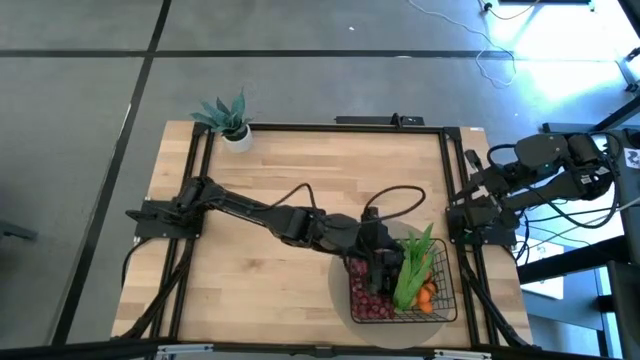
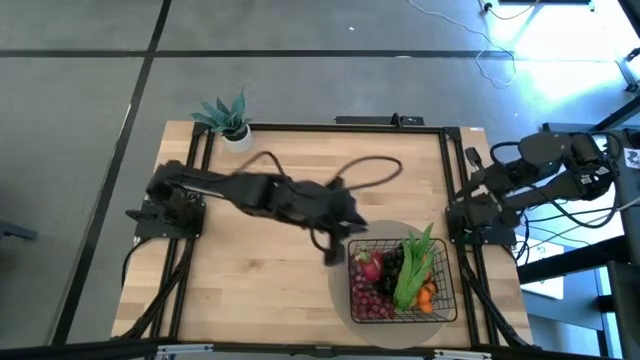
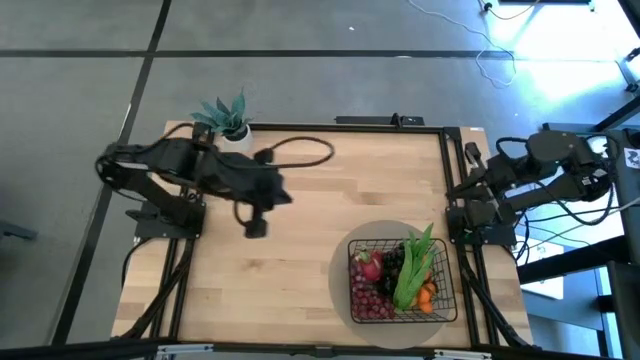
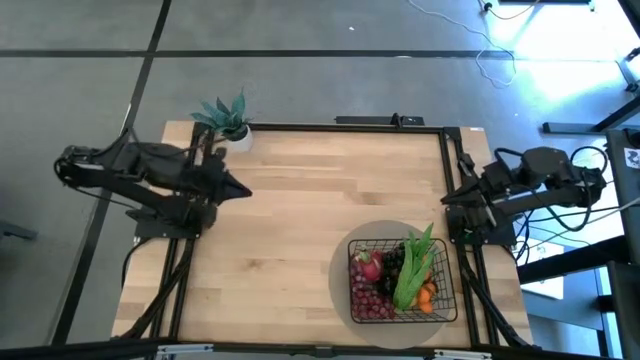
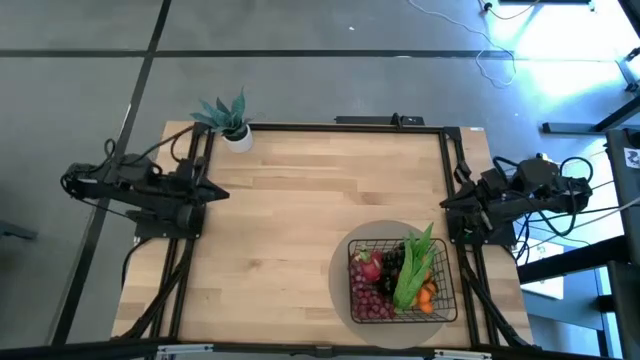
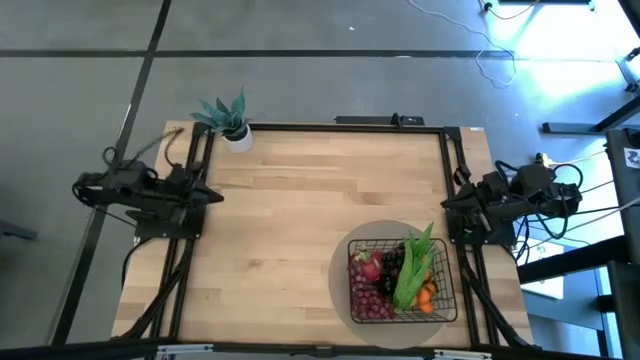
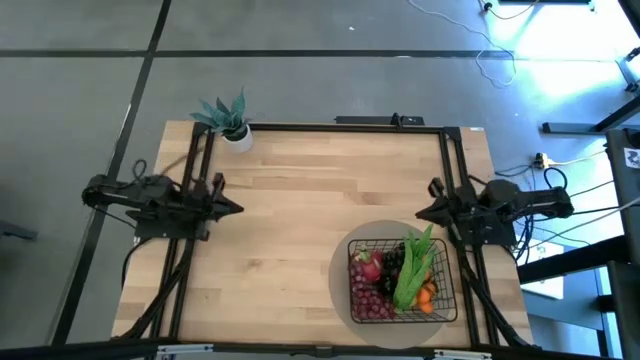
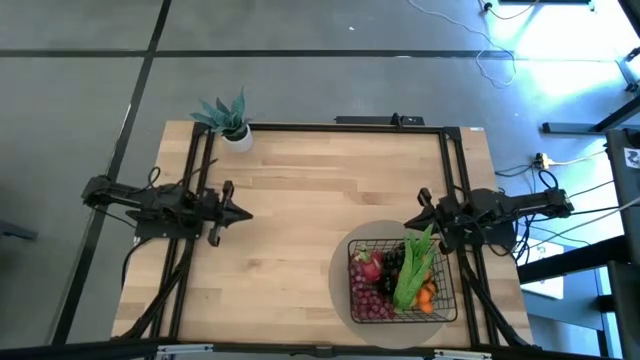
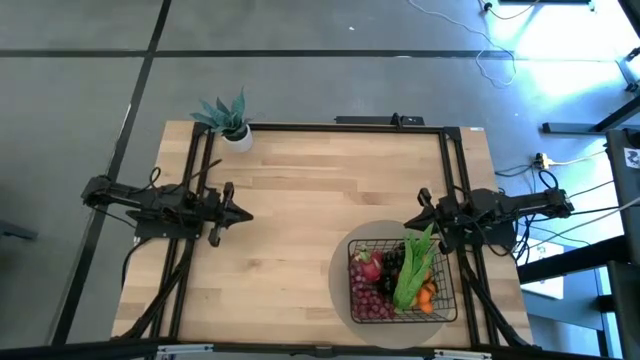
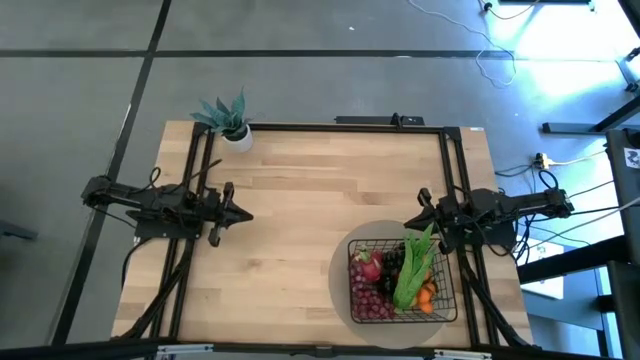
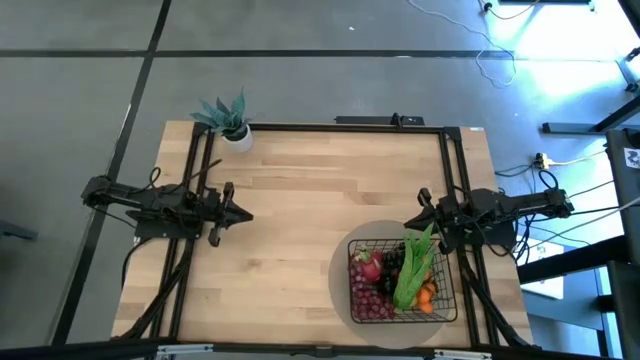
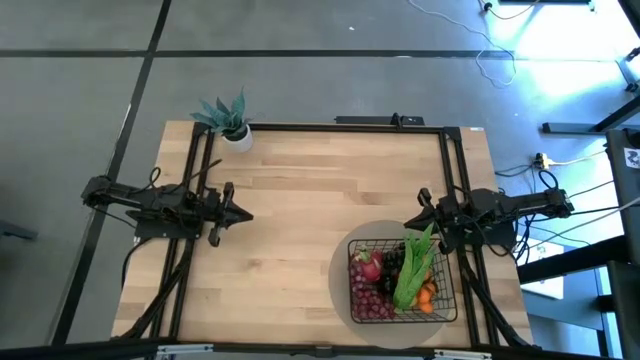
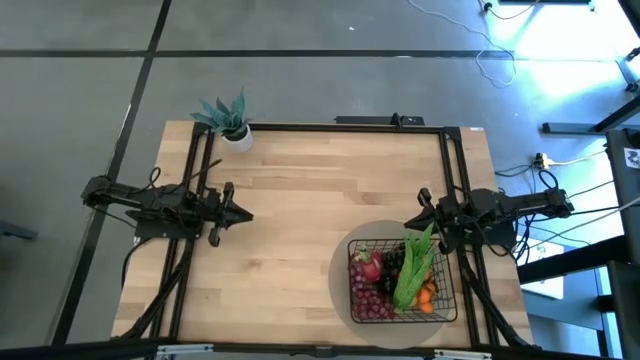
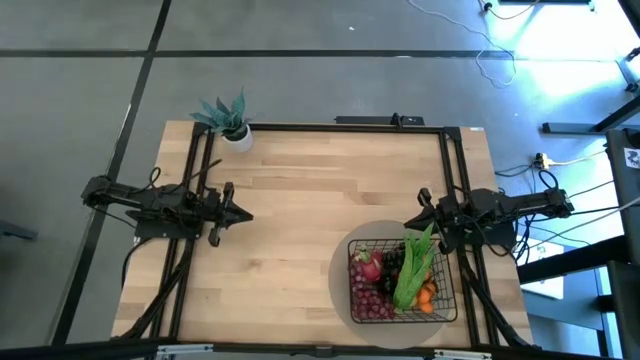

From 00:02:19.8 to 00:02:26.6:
Task: Build produce basket
Return to Home Position

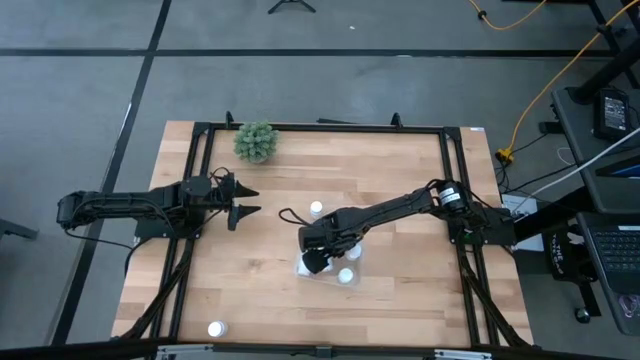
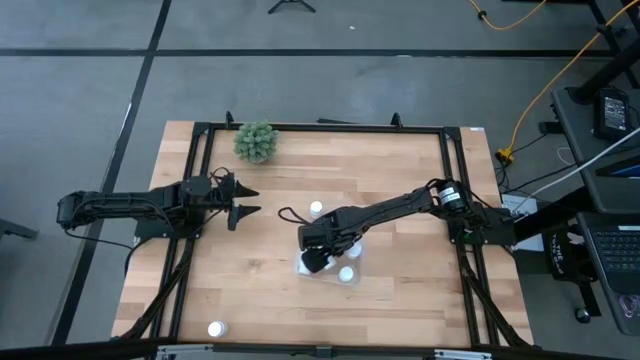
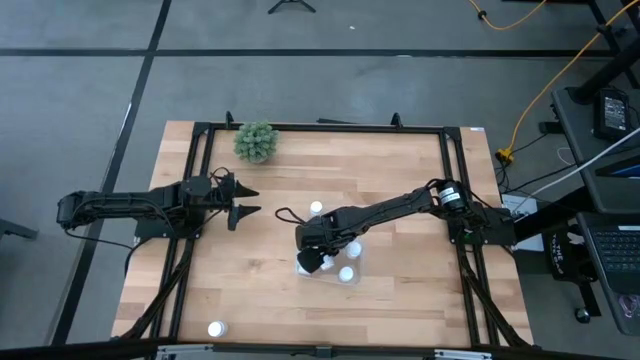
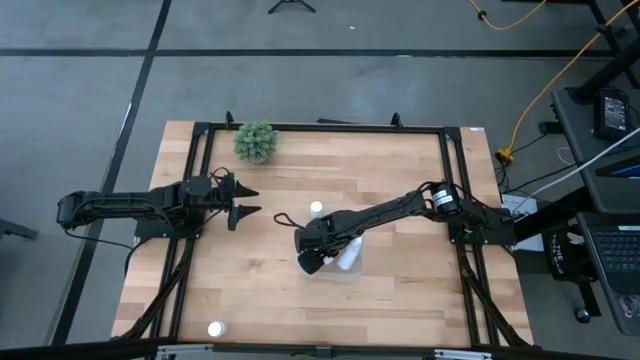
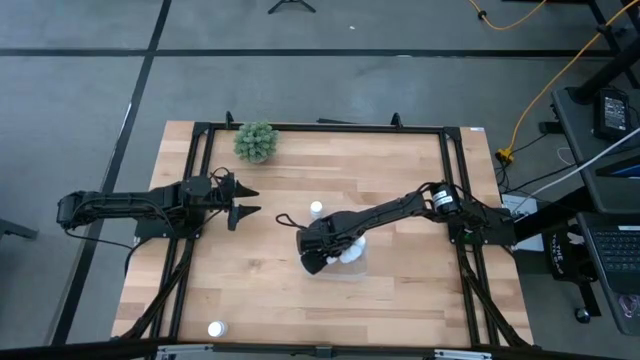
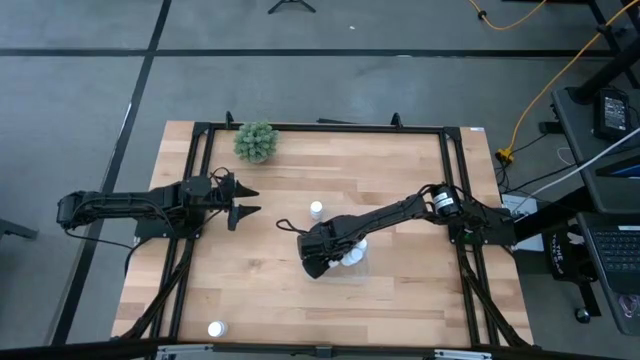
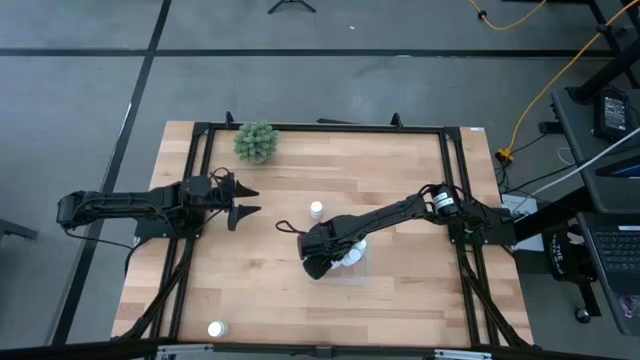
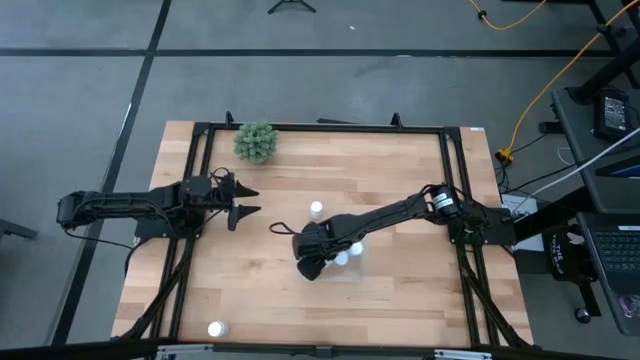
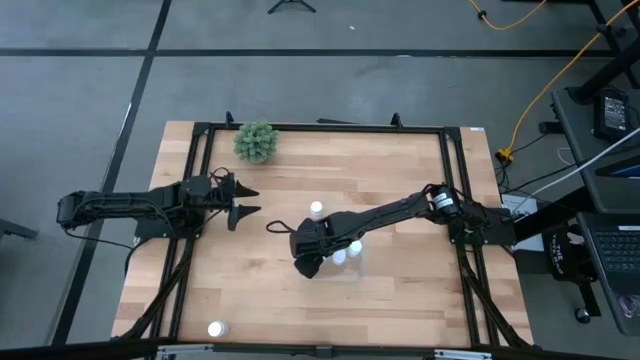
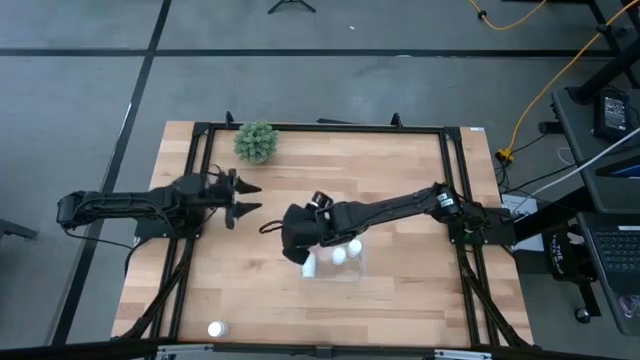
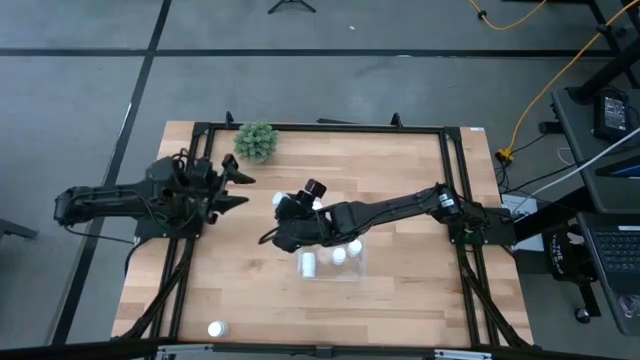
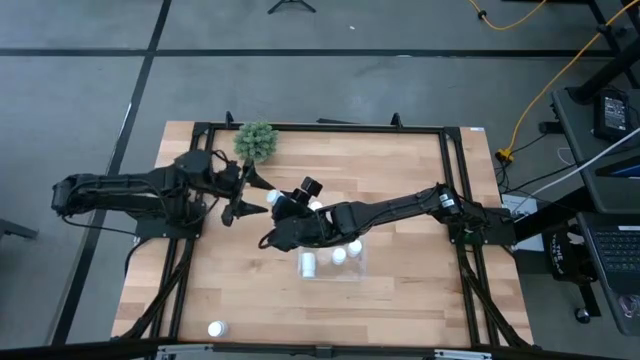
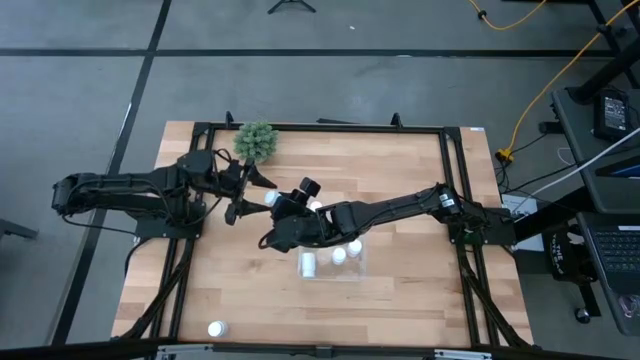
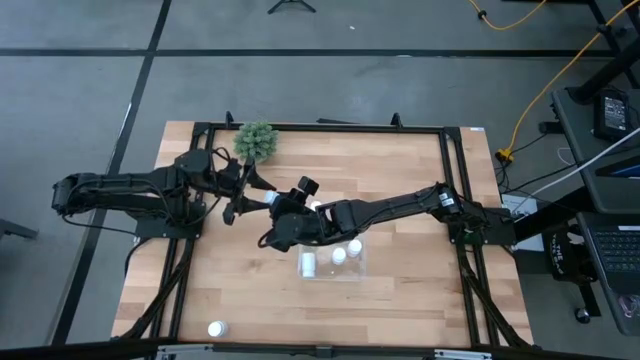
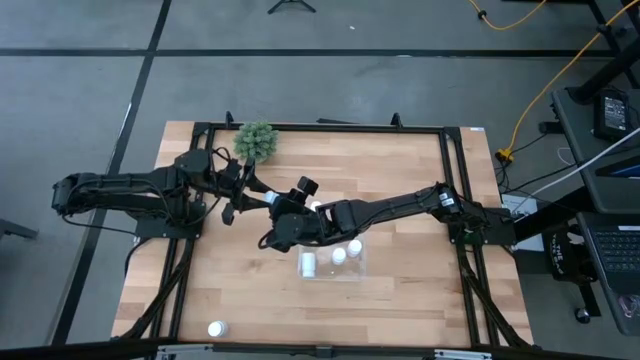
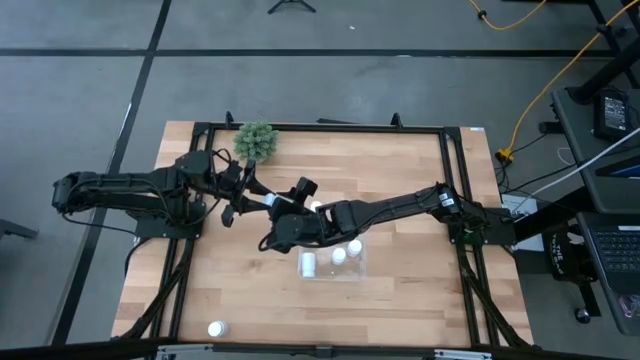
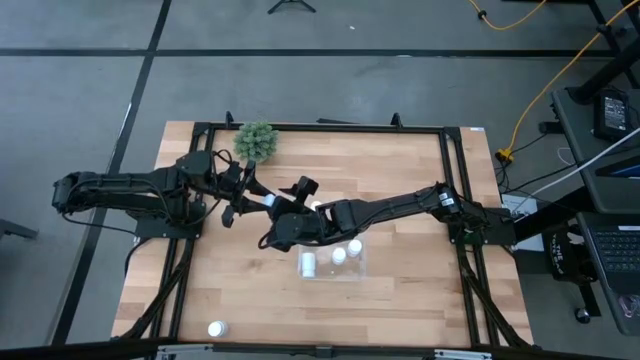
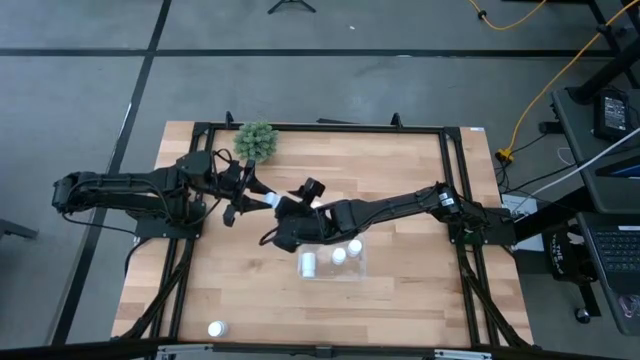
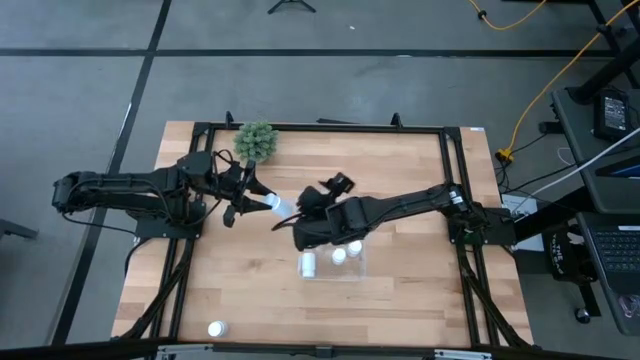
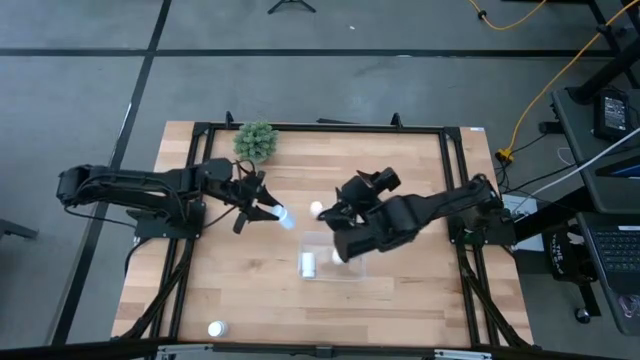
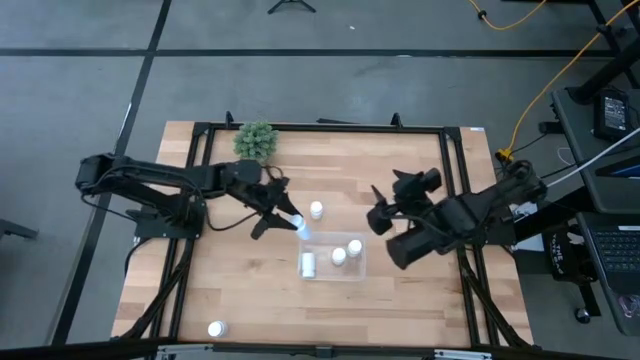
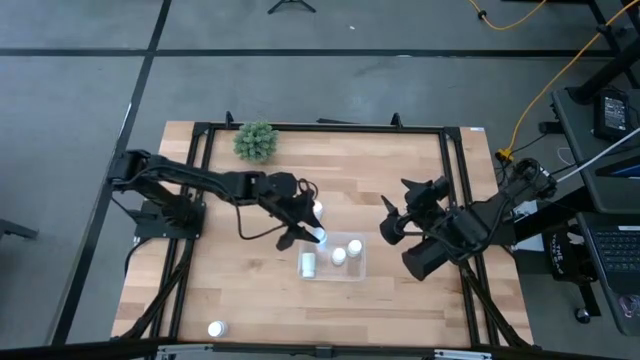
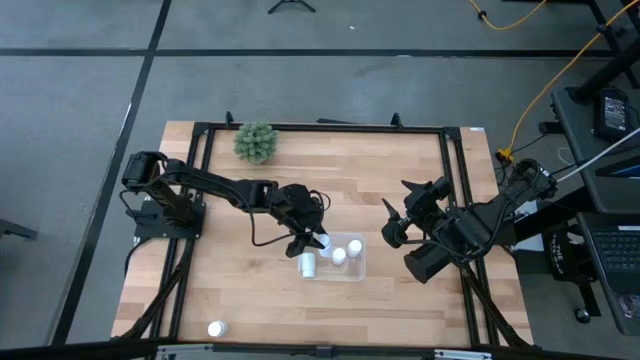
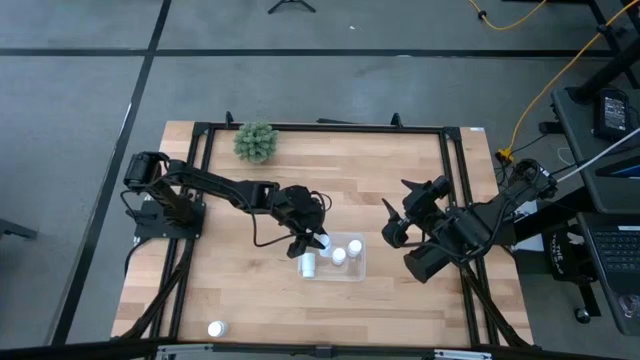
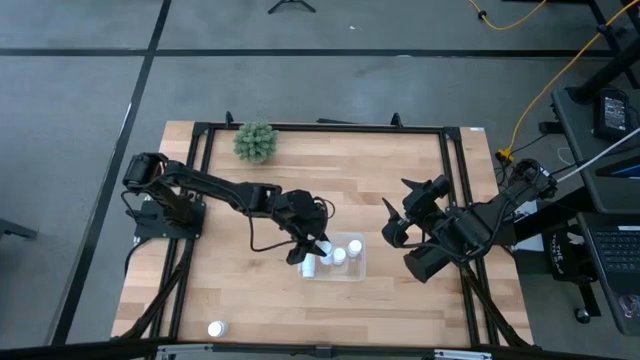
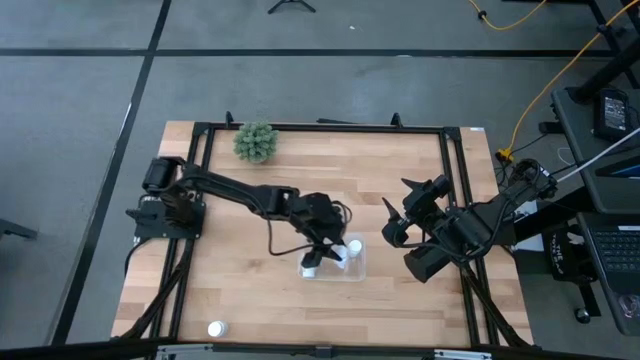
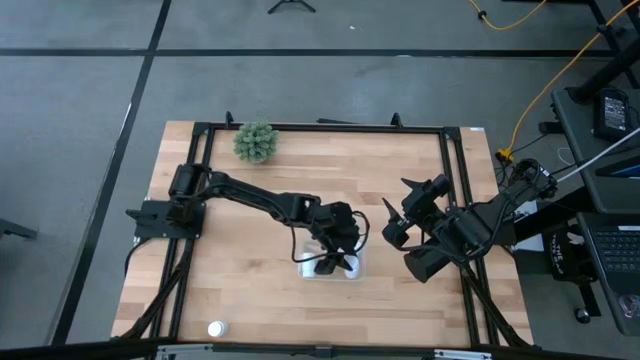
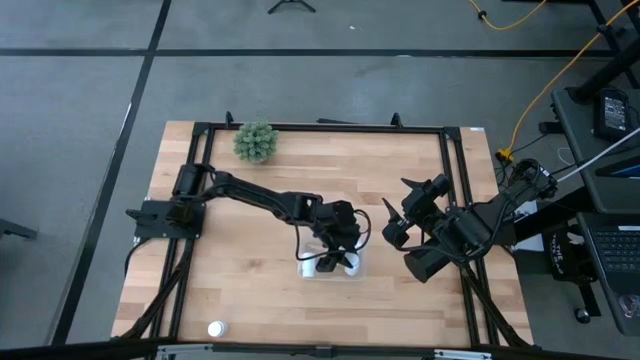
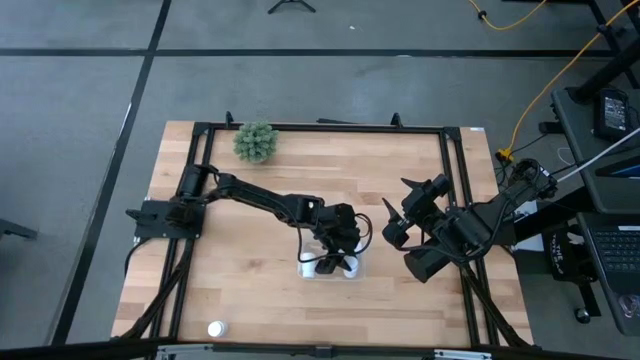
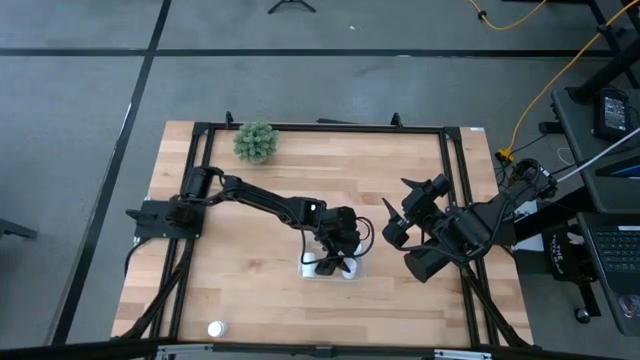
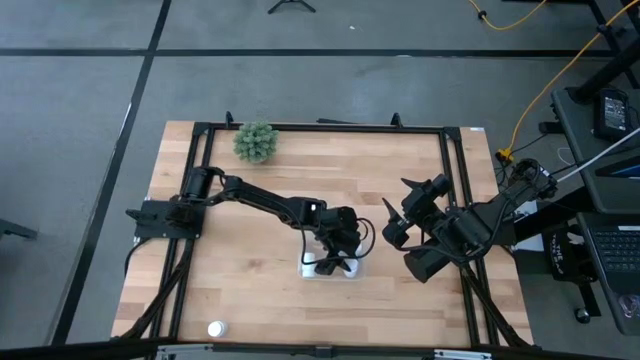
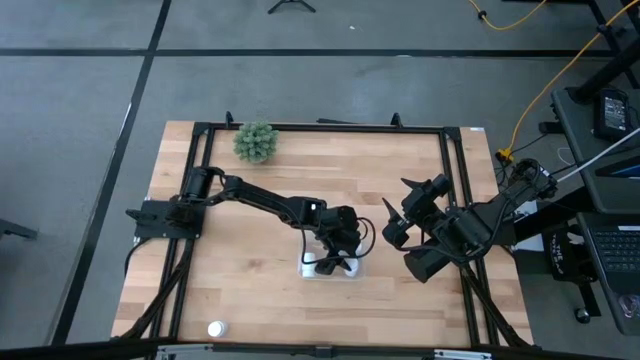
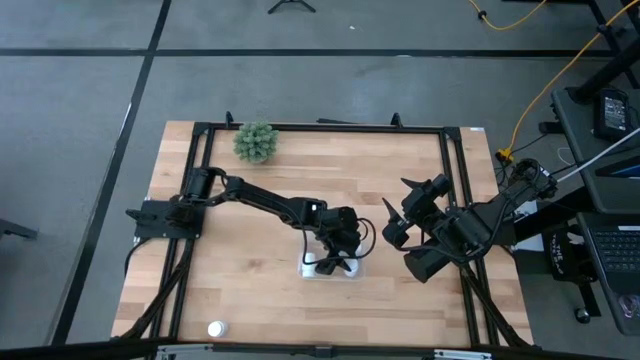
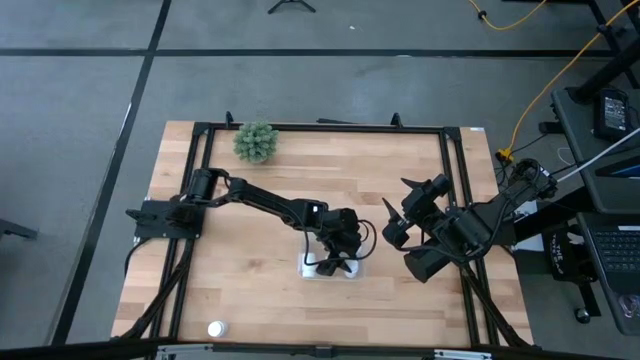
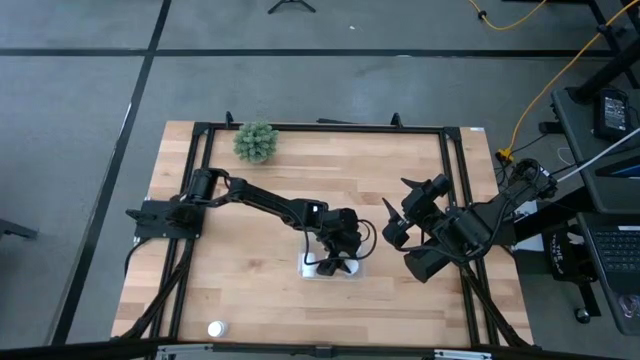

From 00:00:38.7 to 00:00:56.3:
Task: Pick and place pill bottles into a basket
Adjust the white medicine bottle on the transparent bin
